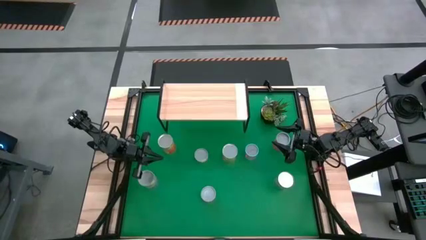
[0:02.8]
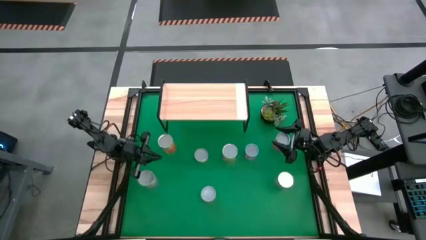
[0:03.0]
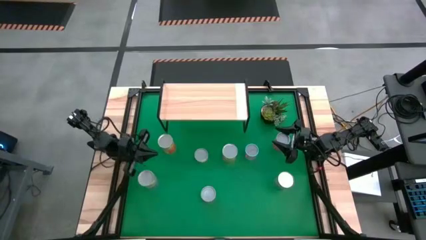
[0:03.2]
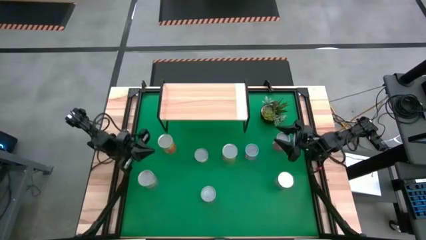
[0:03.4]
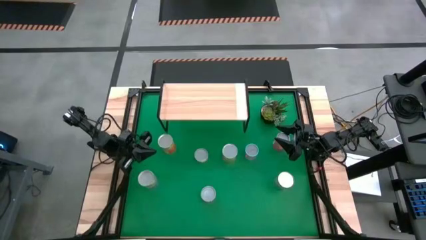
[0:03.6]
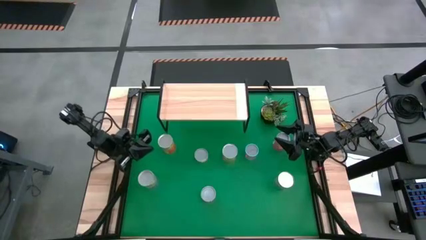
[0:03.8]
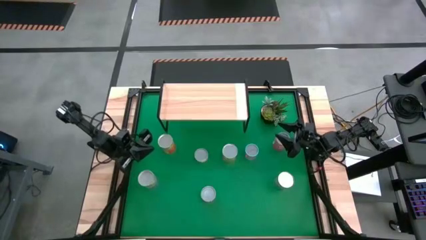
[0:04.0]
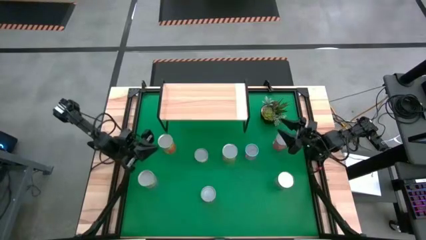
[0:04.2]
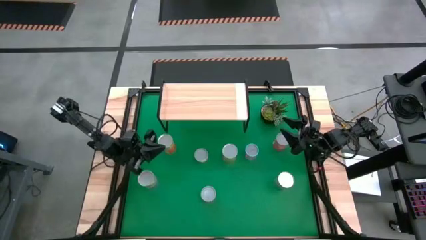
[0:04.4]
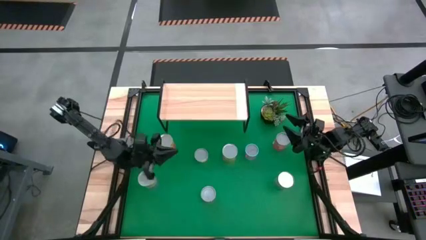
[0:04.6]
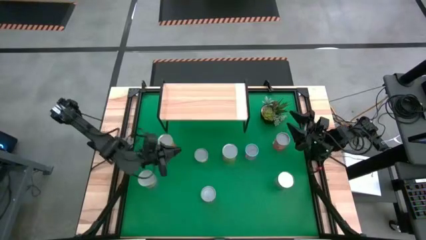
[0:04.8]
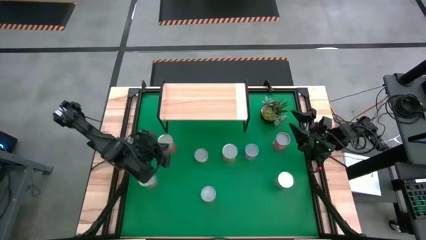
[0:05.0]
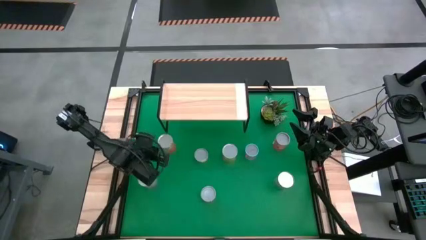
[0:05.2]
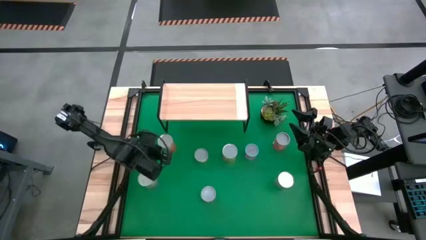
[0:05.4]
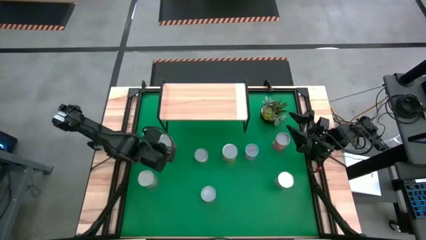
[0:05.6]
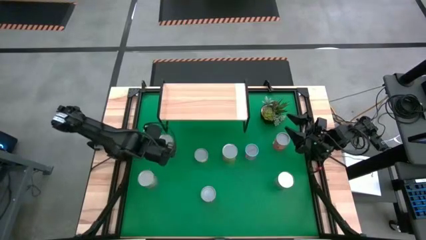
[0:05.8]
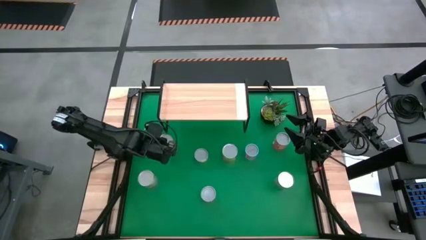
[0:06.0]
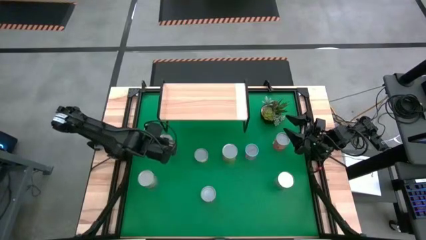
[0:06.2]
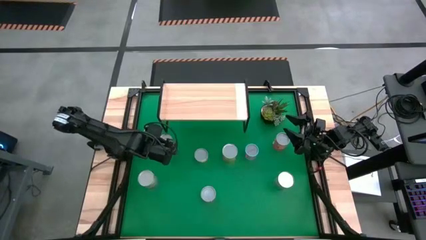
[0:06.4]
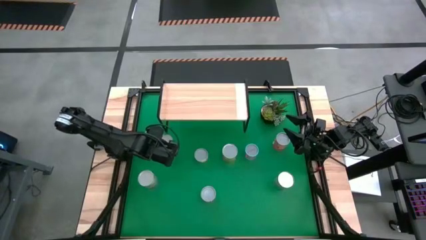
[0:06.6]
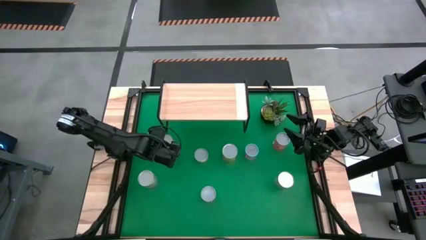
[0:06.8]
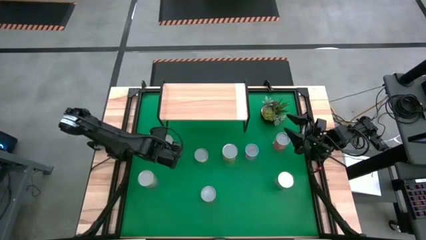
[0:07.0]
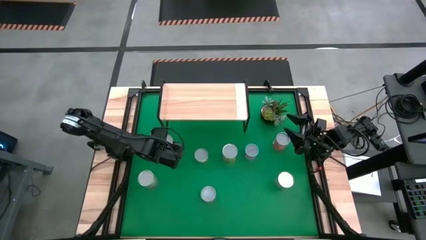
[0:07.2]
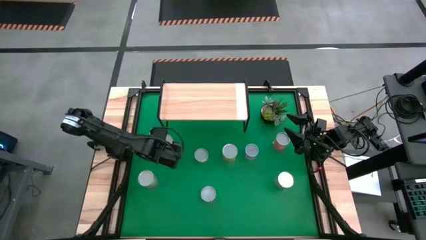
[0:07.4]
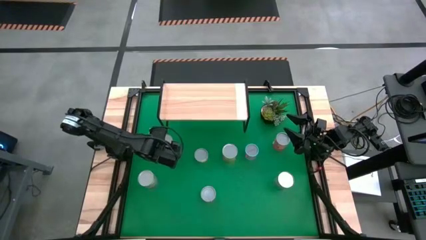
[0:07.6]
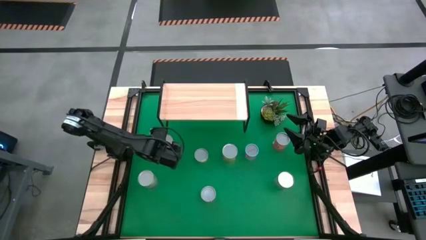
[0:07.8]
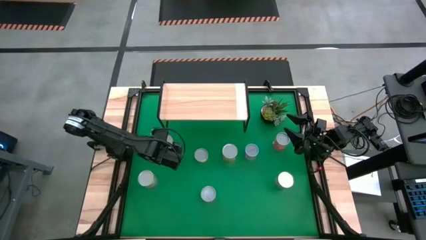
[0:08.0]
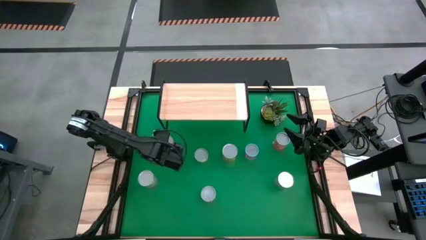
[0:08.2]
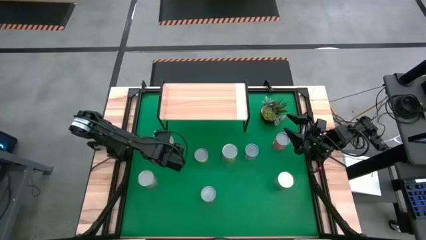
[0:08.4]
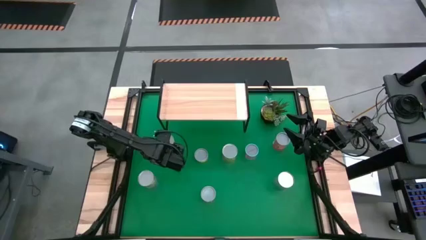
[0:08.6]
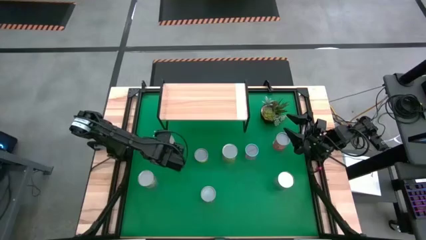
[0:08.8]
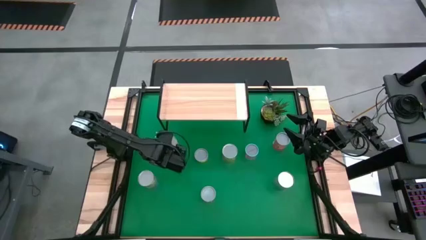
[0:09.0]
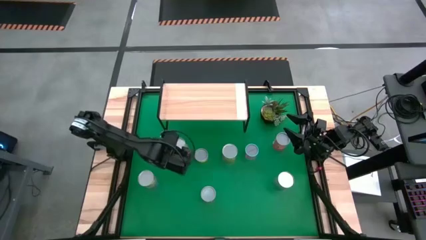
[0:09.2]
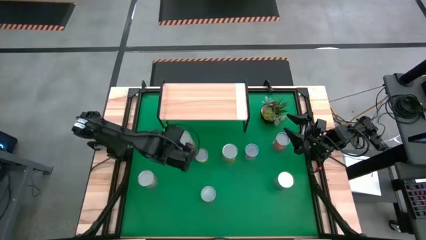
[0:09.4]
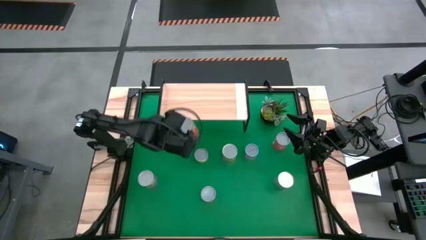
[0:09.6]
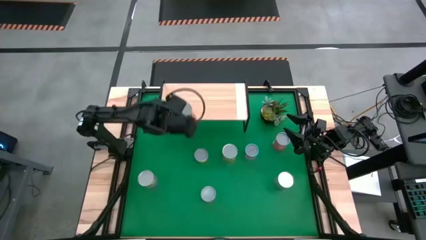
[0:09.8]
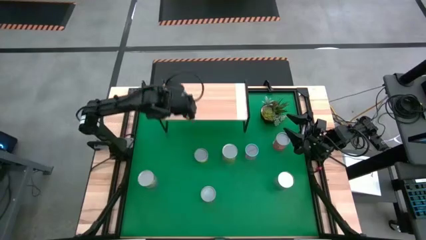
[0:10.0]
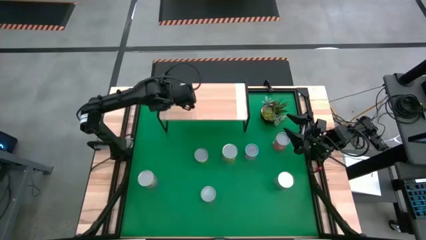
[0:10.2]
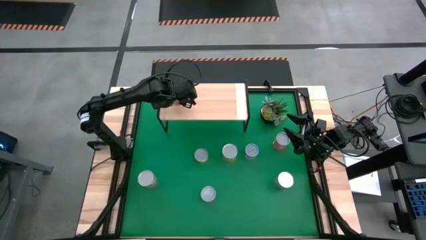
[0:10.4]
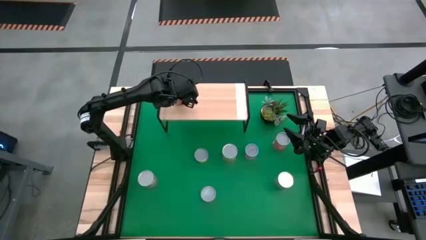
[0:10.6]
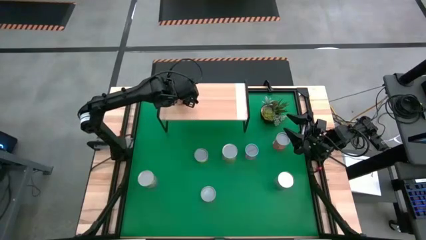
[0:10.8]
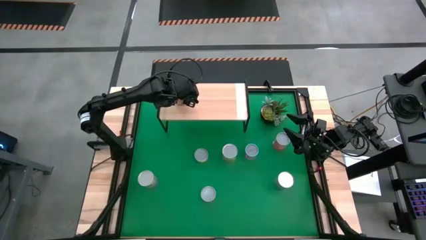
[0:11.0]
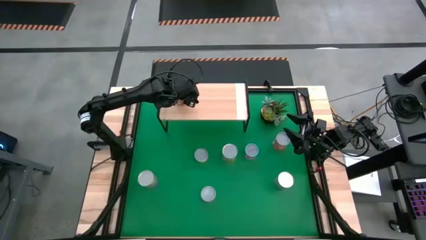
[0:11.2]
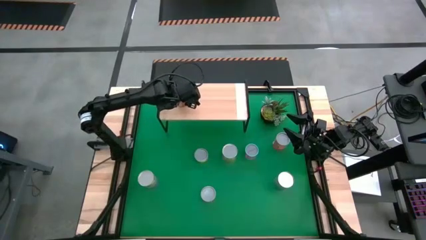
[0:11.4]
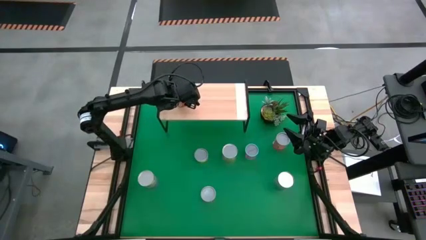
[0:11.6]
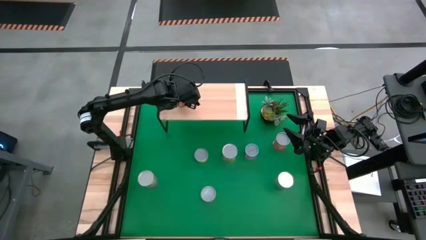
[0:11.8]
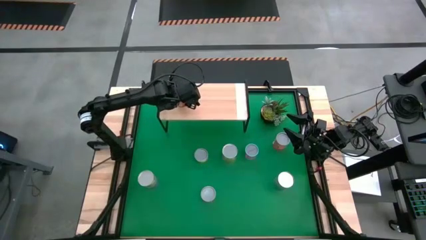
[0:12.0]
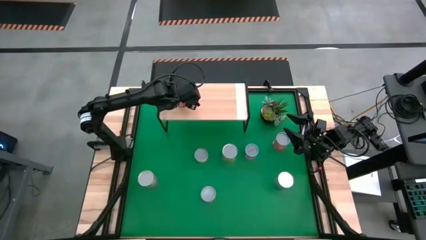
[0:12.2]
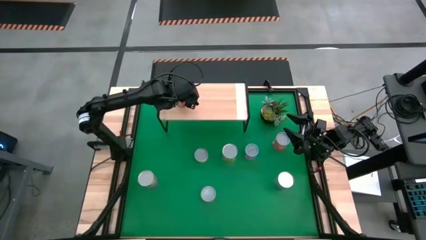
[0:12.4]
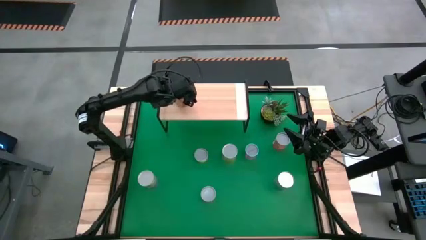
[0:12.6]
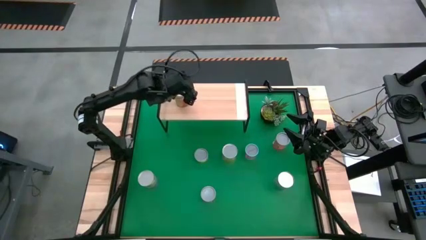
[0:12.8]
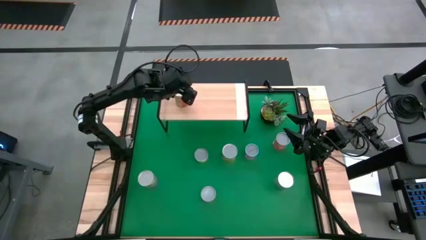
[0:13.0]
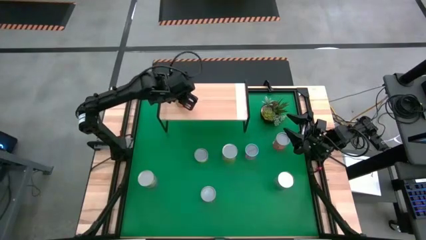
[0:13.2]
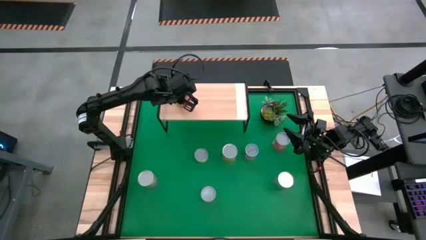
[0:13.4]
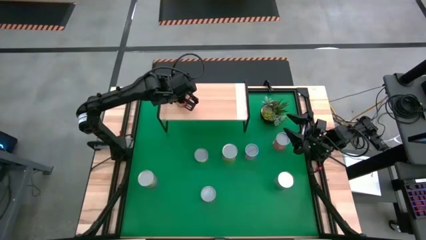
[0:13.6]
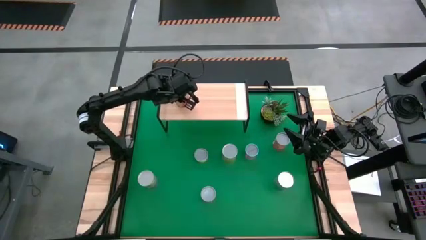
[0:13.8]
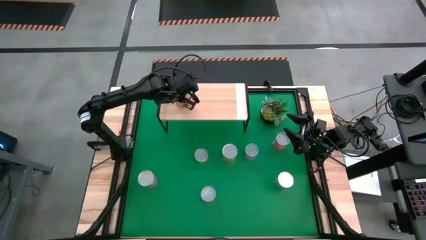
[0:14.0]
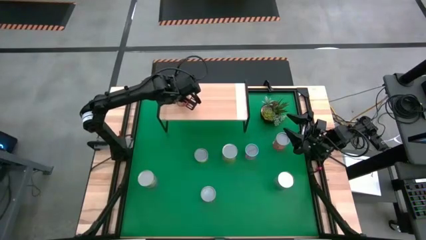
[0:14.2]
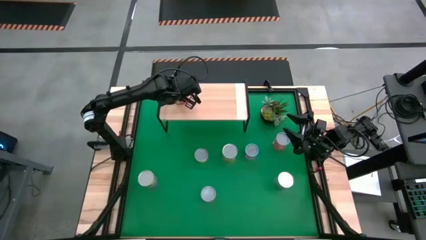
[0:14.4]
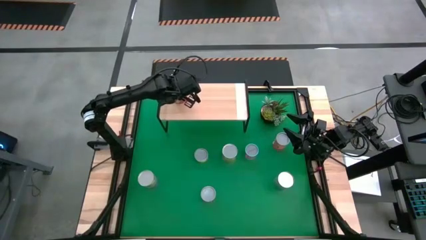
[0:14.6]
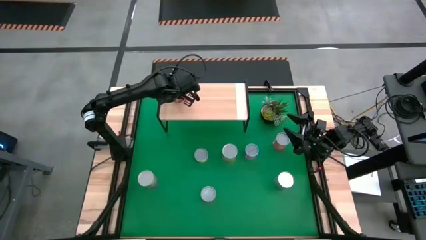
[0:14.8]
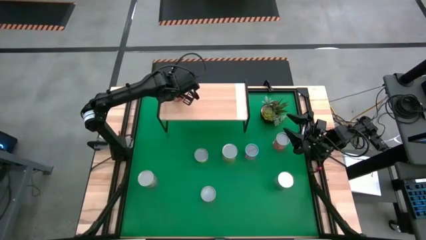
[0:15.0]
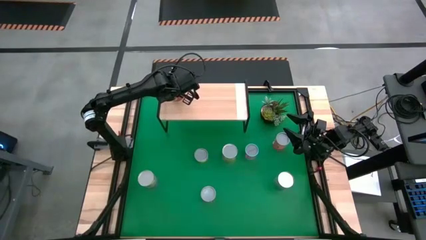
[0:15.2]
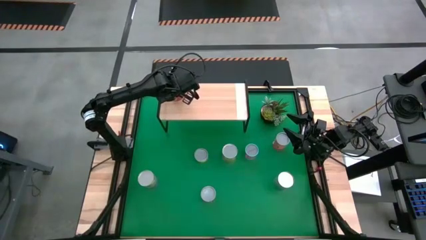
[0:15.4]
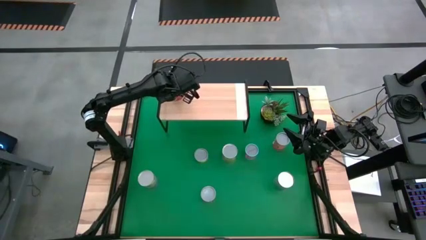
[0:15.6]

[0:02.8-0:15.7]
Task: Pick and place cans onto a shelf
Put the big orange can on the shelf
